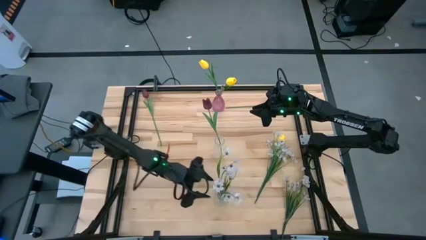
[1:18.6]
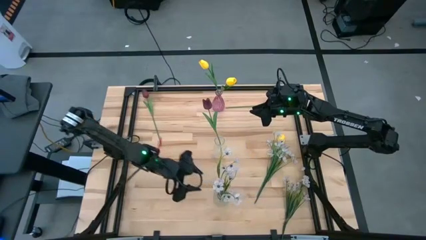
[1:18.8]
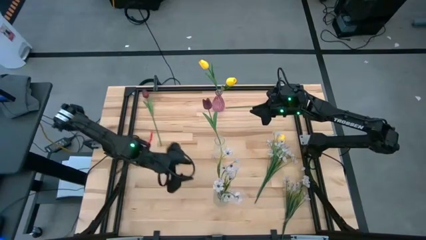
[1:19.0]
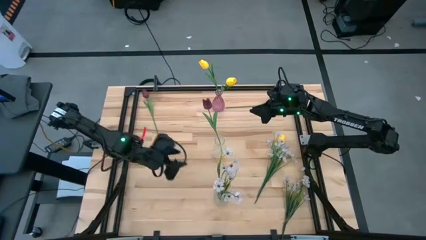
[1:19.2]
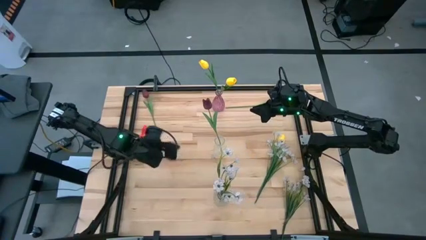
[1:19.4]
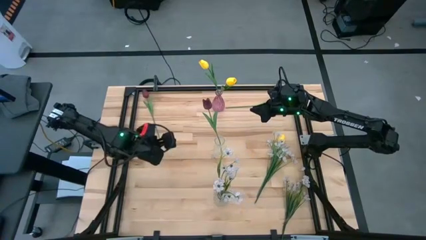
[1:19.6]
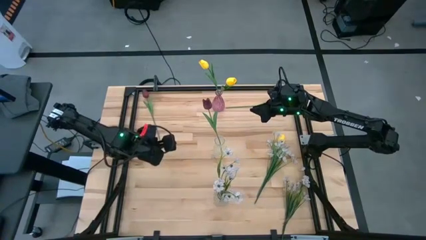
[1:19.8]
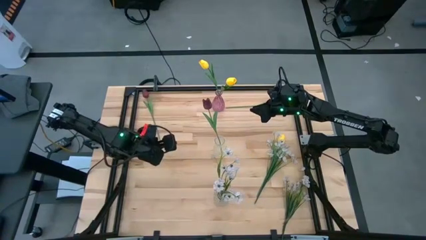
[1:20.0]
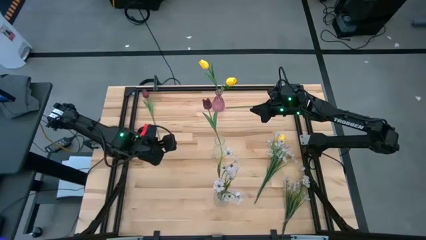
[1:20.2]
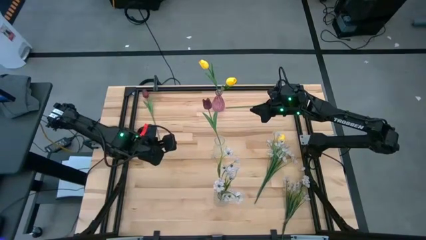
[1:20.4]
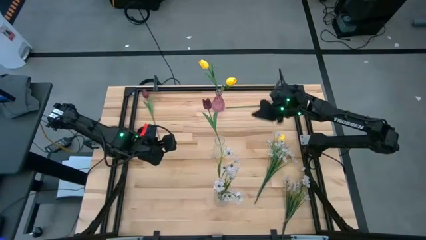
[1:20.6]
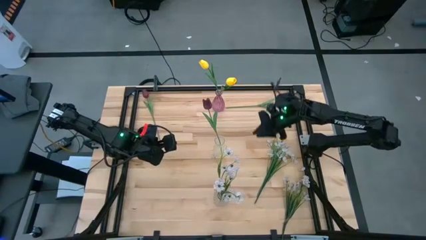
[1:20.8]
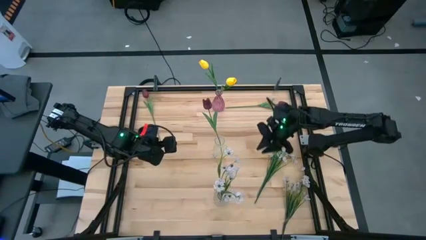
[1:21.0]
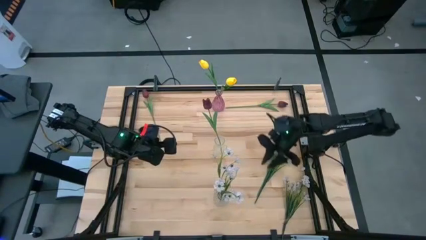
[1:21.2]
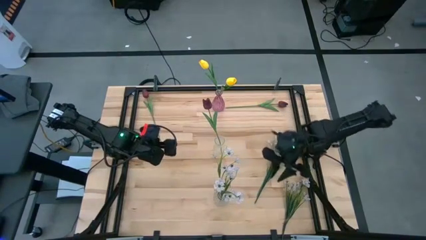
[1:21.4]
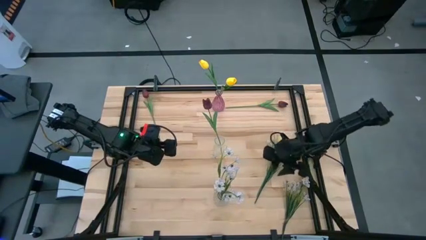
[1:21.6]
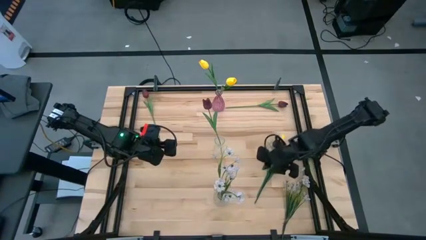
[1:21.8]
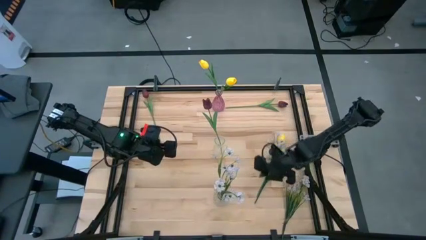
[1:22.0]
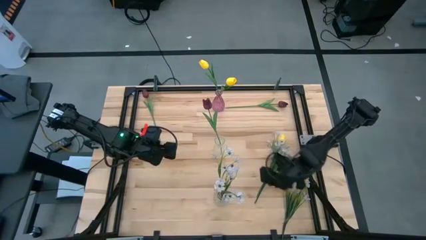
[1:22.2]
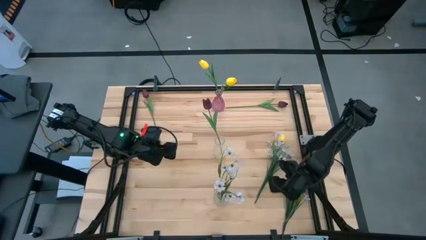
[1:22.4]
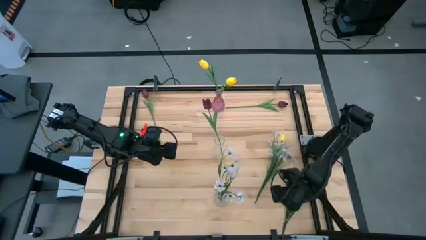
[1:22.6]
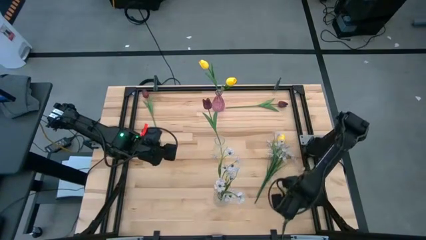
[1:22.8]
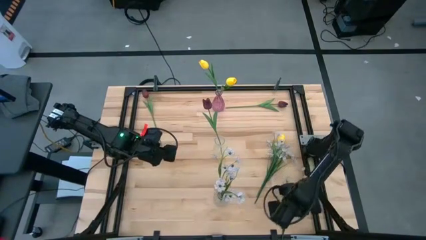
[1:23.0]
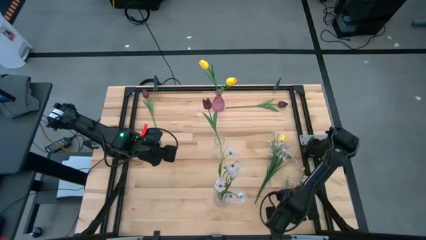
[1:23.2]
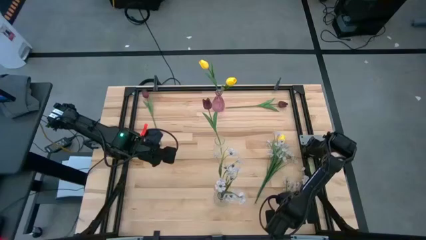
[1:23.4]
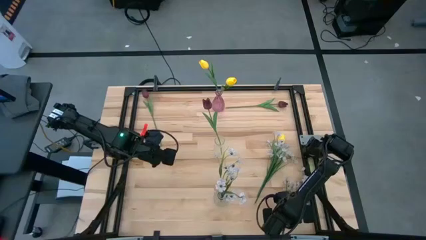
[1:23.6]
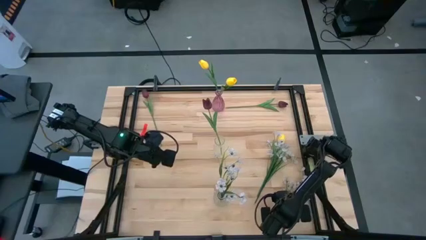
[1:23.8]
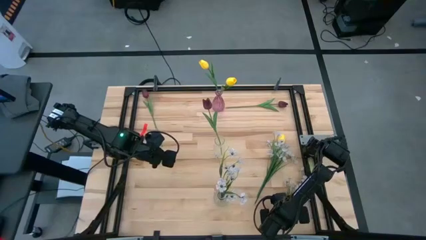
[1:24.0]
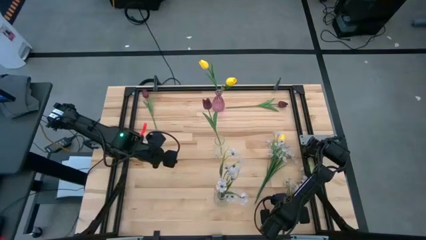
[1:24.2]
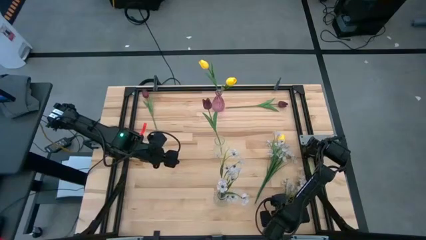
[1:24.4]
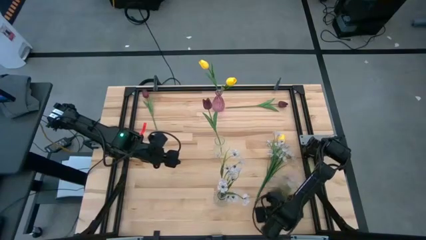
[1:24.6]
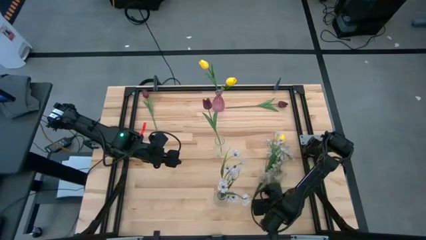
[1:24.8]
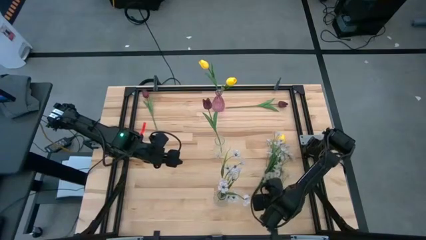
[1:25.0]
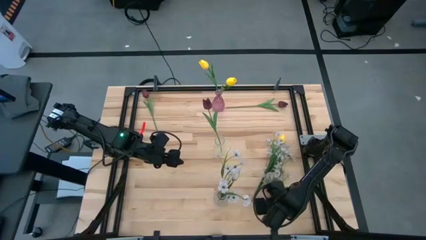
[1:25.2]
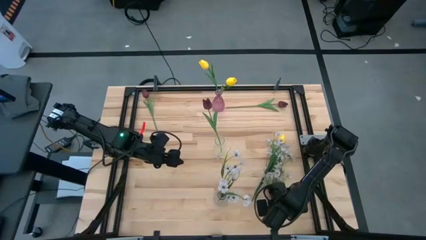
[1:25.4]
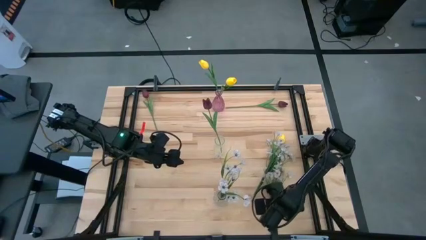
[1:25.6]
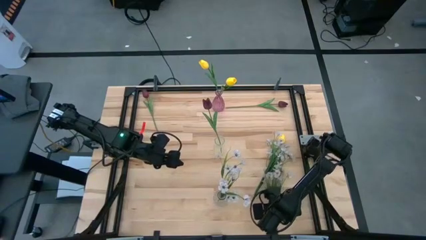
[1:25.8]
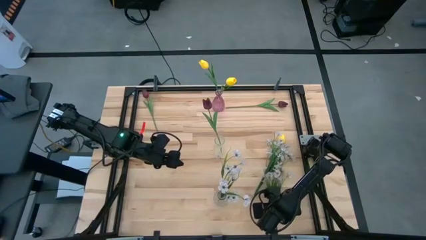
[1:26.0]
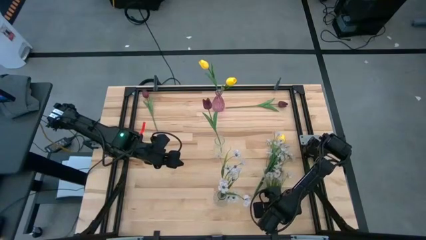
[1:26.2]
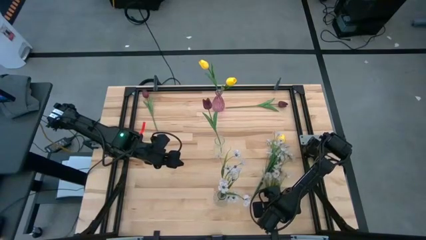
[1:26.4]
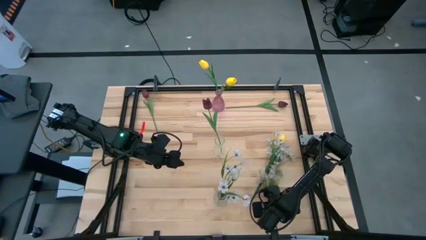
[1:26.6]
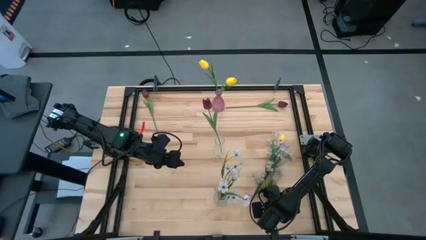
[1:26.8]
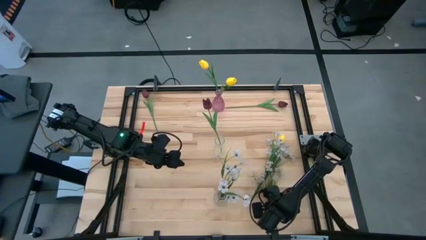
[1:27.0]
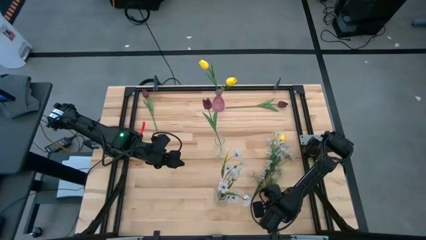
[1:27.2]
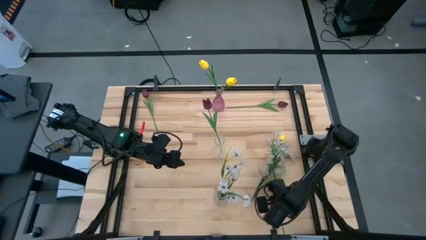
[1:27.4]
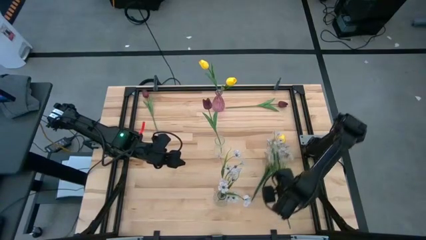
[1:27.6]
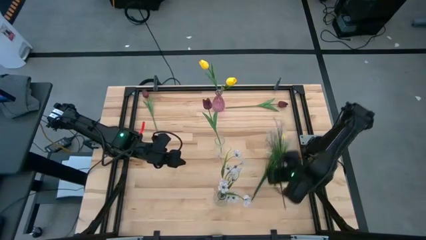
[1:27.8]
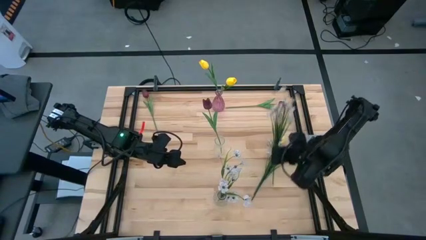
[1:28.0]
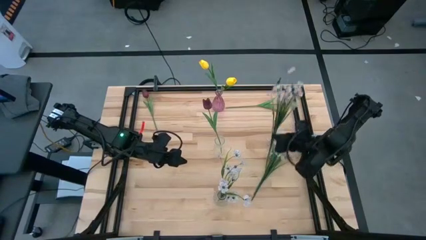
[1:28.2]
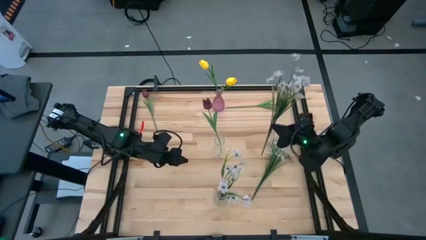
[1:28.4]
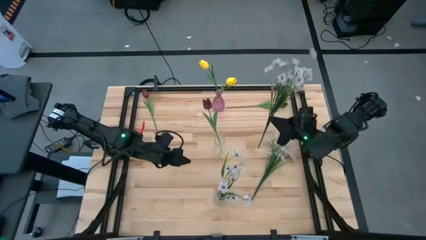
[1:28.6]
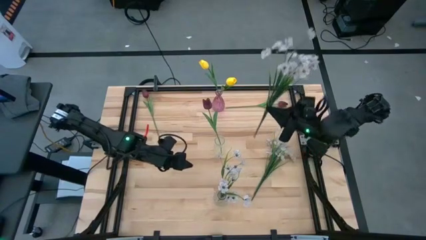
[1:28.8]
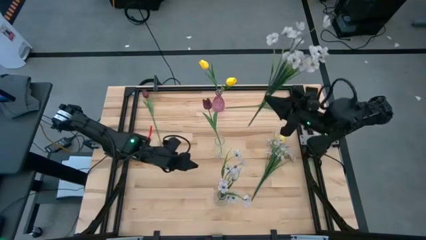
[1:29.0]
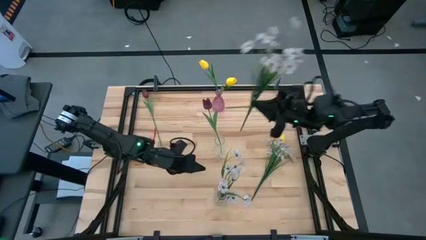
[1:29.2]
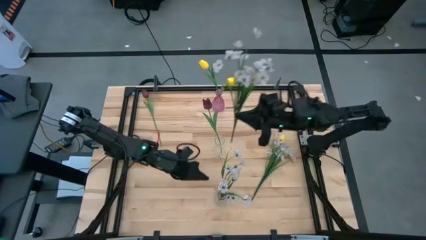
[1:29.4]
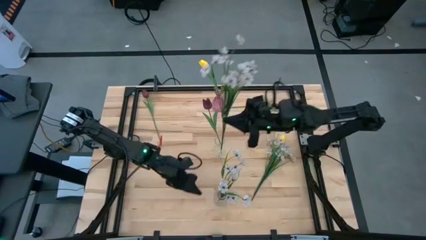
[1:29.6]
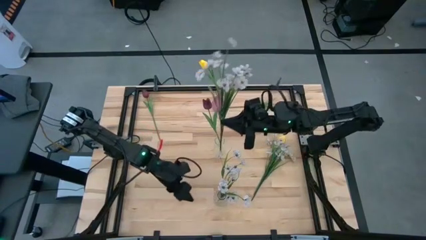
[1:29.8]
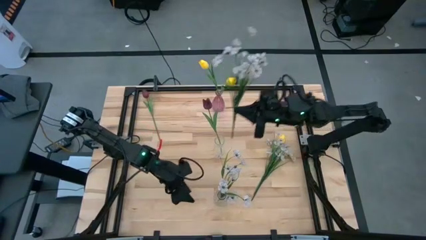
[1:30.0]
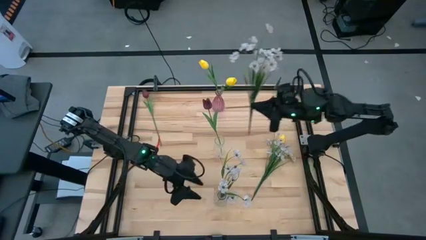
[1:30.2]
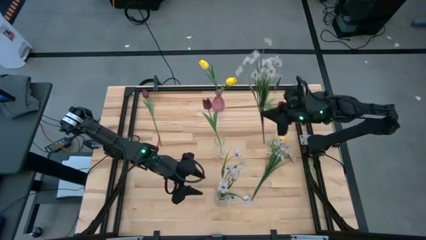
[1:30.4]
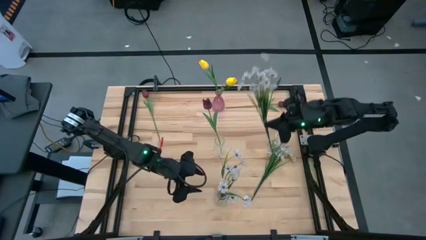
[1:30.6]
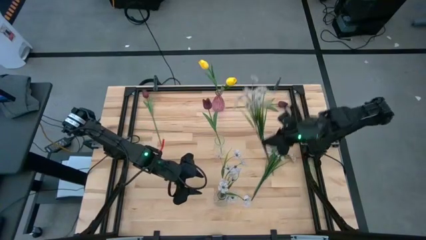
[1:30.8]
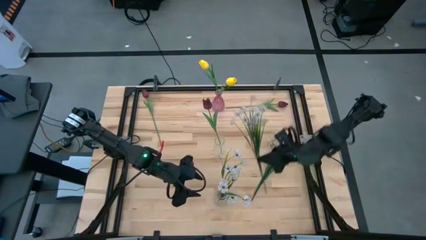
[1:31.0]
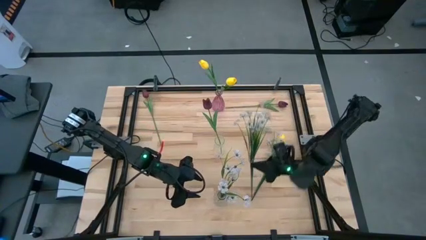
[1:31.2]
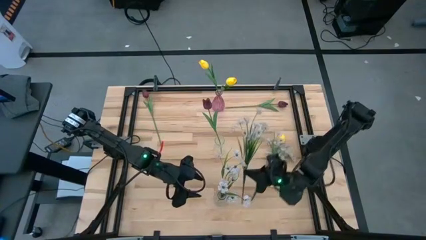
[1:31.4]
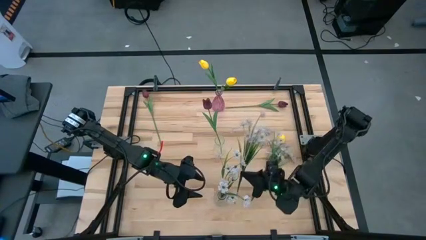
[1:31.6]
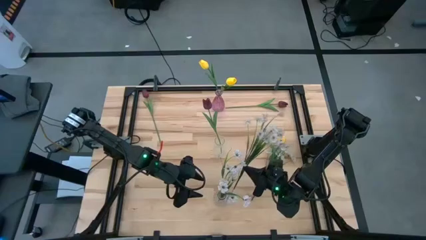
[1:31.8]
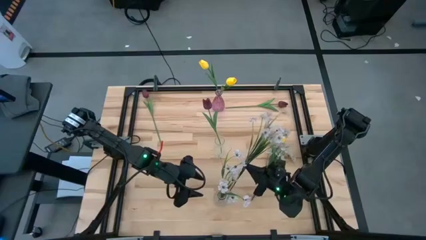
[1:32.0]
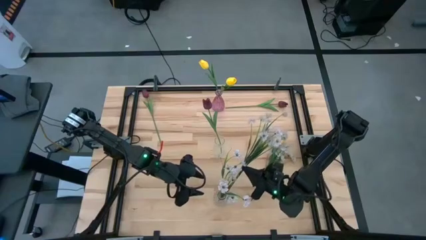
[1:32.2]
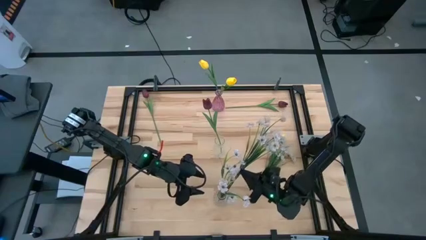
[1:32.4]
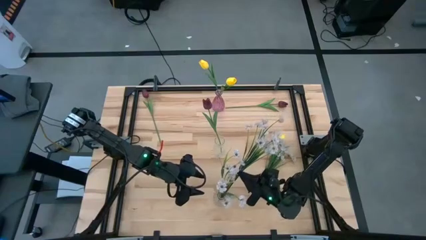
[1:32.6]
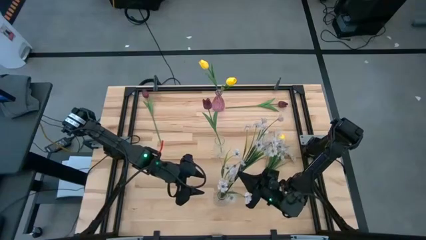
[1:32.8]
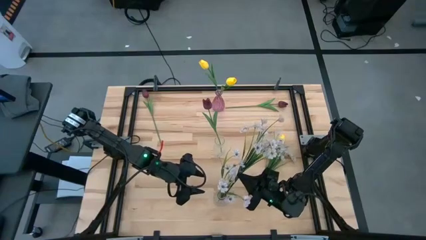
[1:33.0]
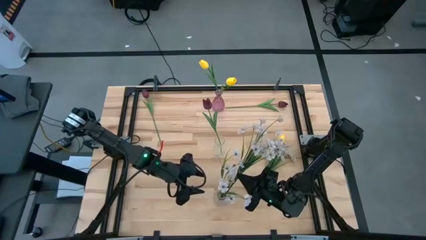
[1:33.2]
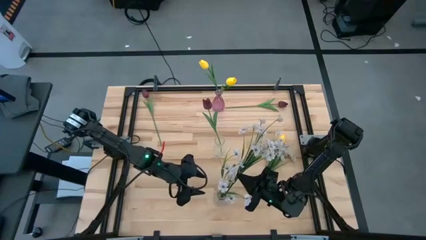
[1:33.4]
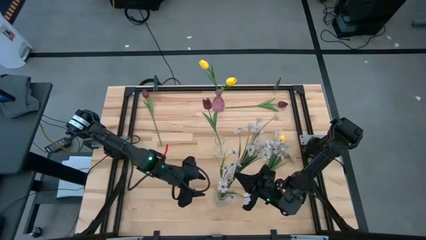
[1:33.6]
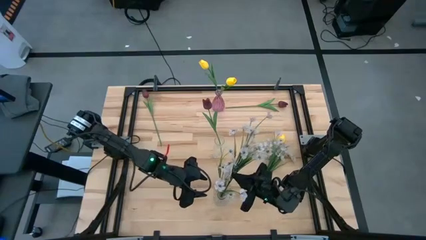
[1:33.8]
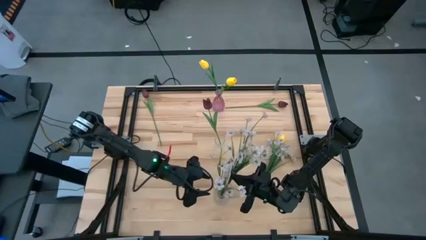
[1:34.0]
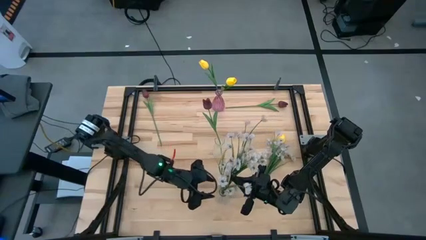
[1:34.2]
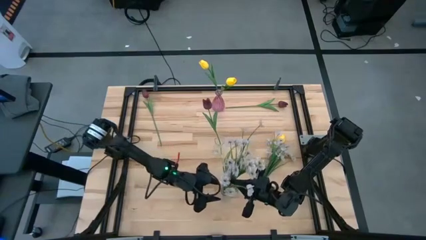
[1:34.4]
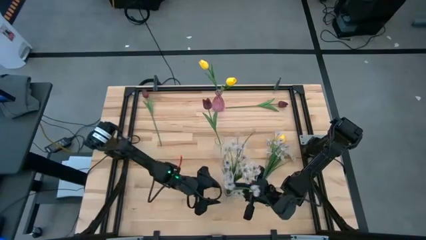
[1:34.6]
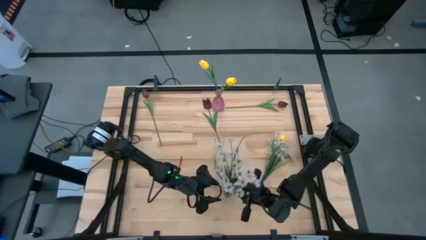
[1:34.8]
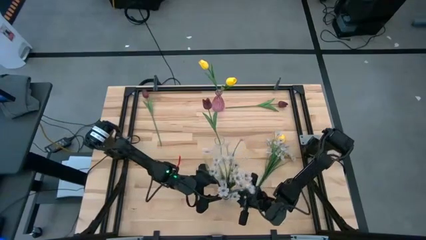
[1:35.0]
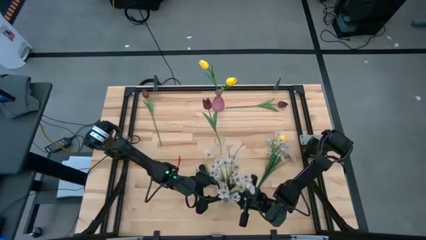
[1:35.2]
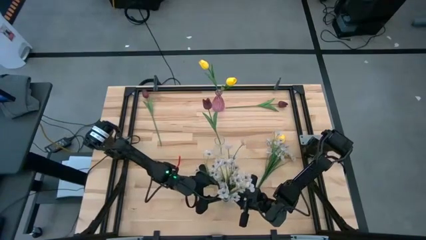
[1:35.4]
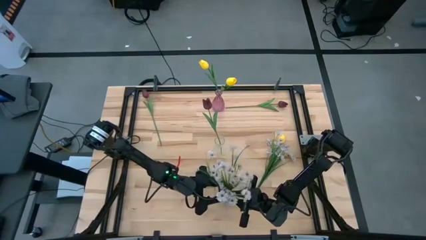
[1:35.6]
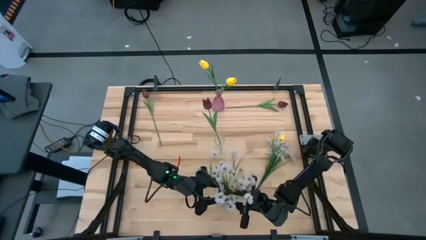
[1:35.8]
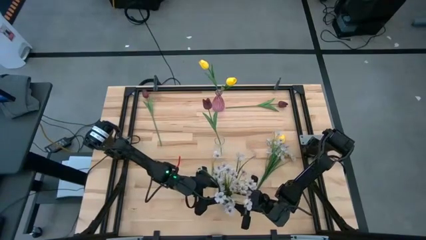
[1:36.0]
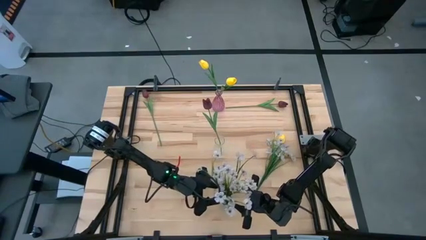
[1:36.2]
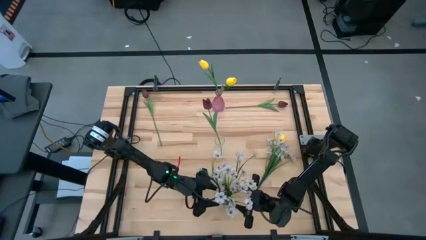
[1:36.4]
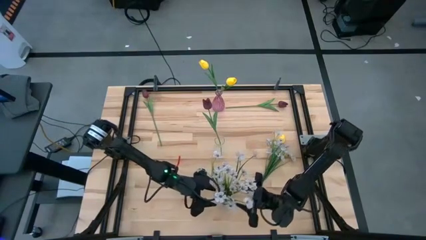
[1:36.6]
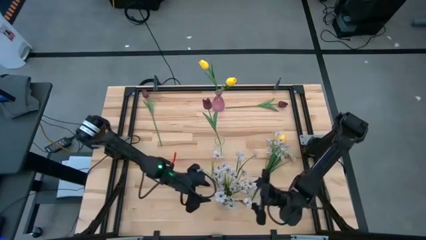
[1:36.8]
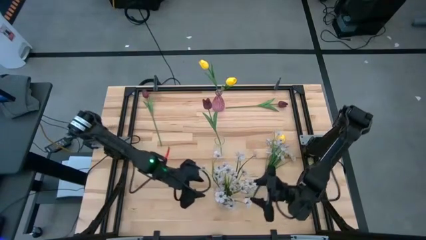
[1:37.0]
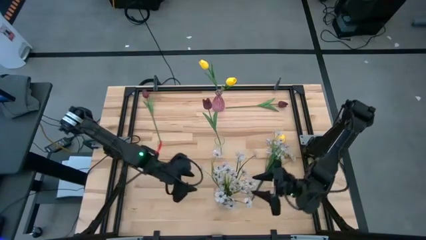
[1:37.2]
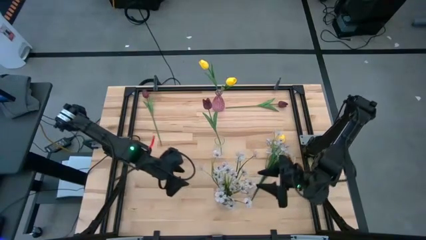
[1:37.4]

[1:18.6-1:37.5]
Task: Sort flowers into vase by color
Put the bottom white flowers into the bottom transparent vase
